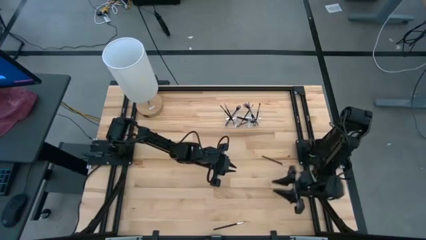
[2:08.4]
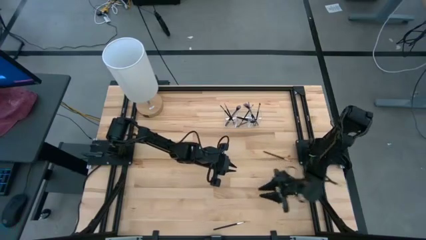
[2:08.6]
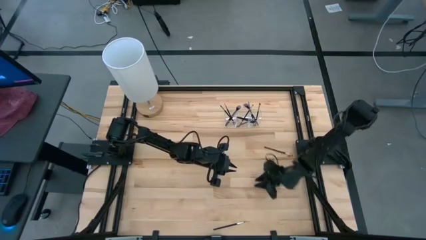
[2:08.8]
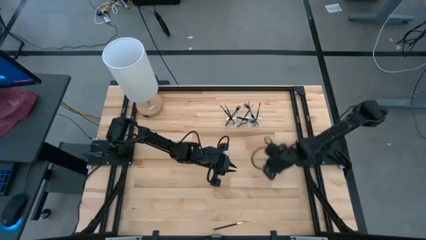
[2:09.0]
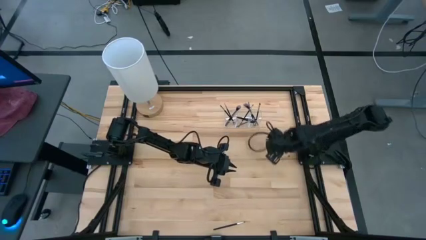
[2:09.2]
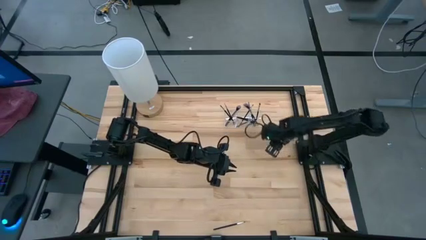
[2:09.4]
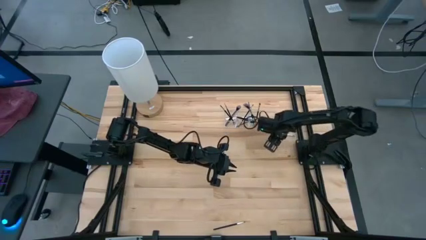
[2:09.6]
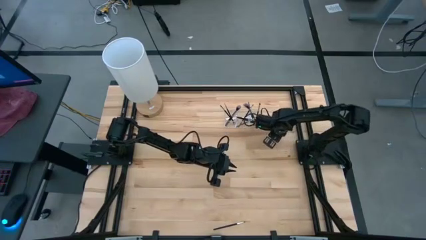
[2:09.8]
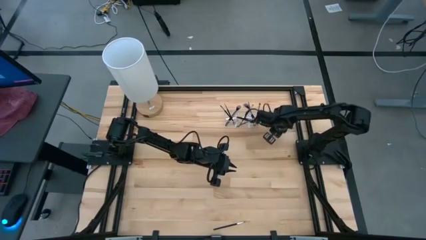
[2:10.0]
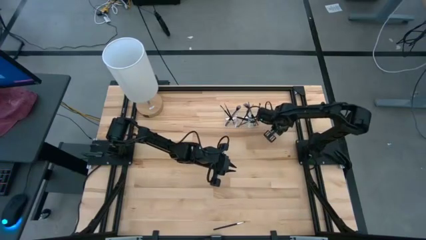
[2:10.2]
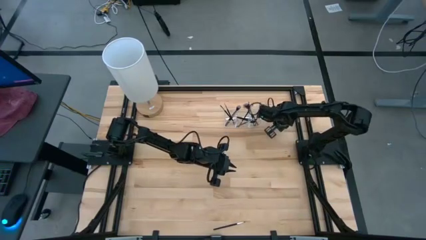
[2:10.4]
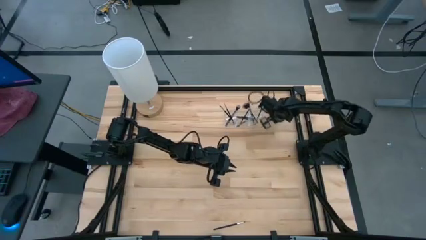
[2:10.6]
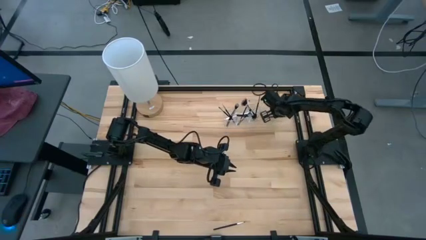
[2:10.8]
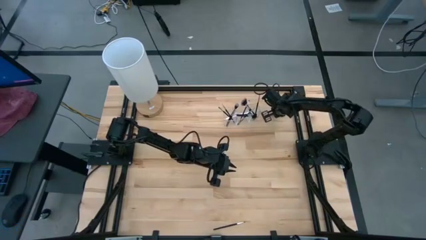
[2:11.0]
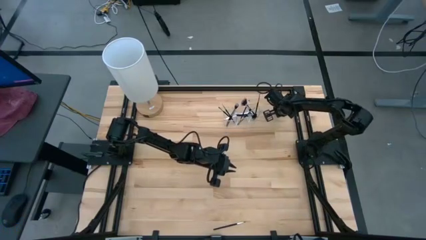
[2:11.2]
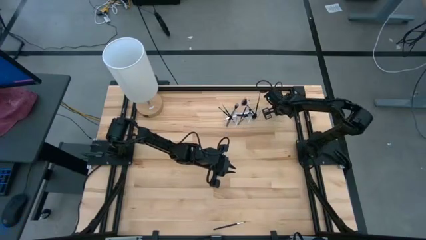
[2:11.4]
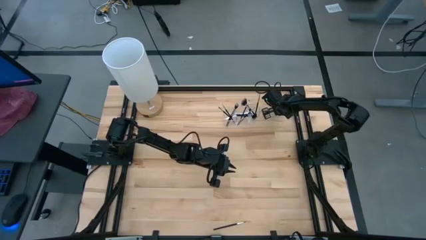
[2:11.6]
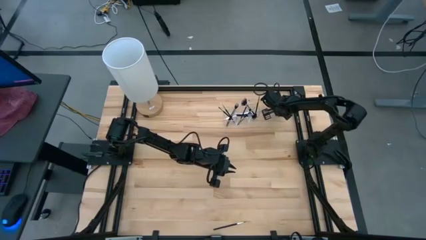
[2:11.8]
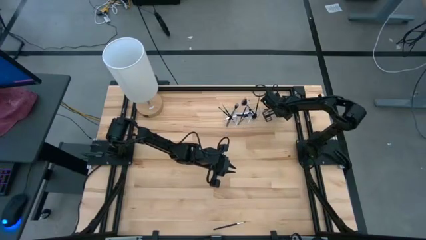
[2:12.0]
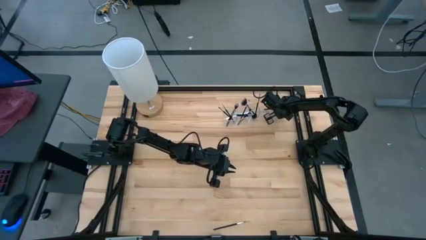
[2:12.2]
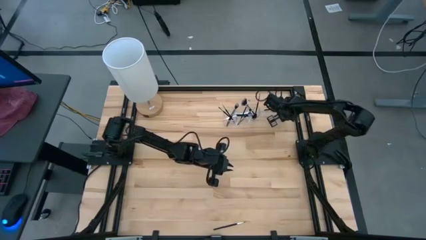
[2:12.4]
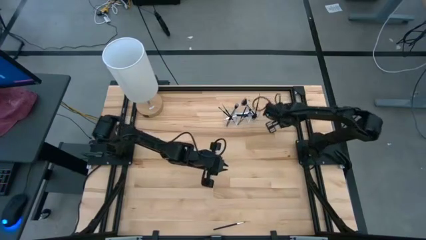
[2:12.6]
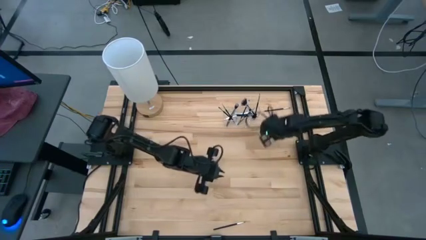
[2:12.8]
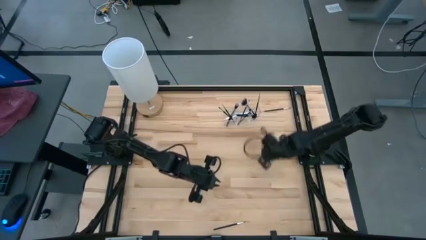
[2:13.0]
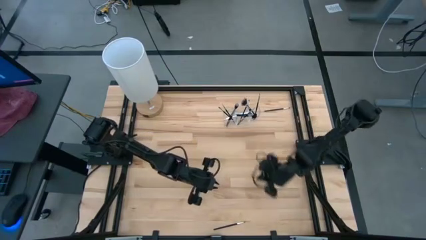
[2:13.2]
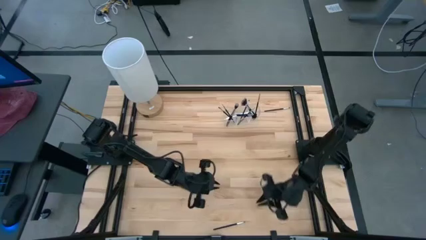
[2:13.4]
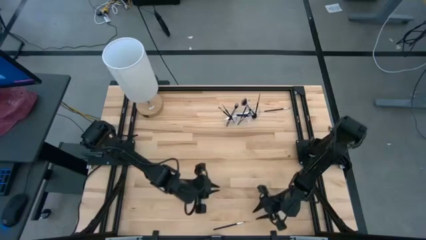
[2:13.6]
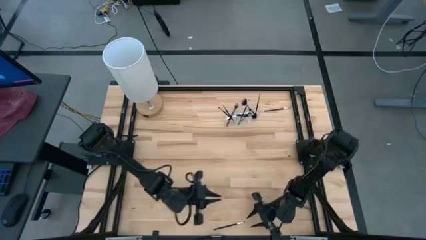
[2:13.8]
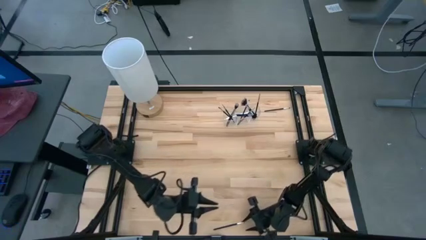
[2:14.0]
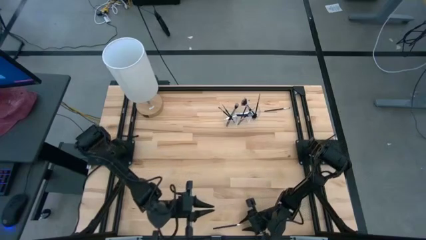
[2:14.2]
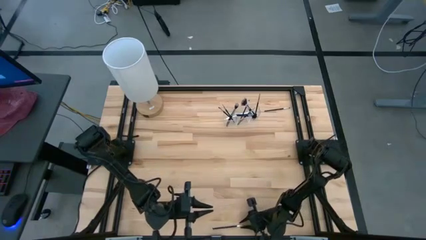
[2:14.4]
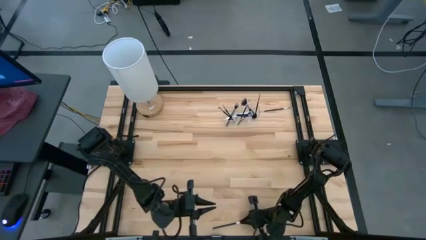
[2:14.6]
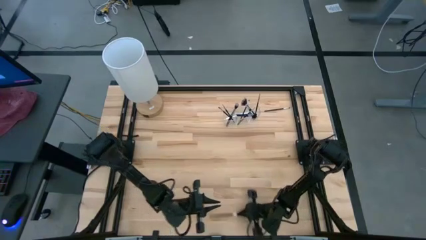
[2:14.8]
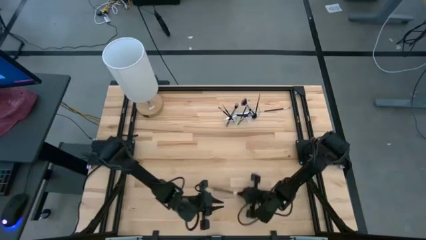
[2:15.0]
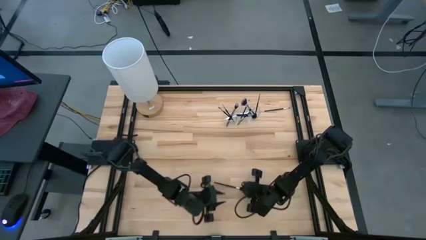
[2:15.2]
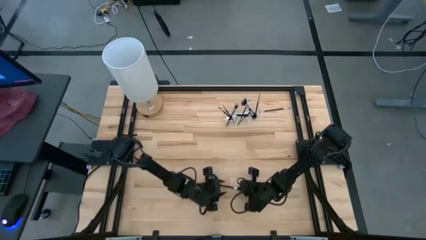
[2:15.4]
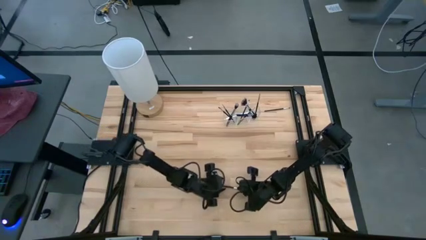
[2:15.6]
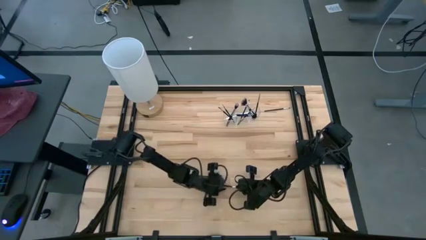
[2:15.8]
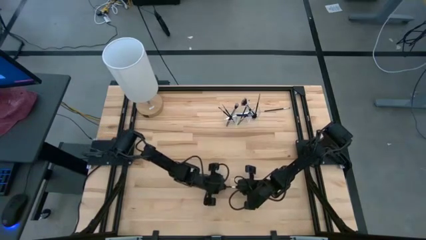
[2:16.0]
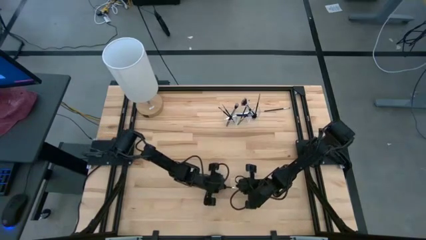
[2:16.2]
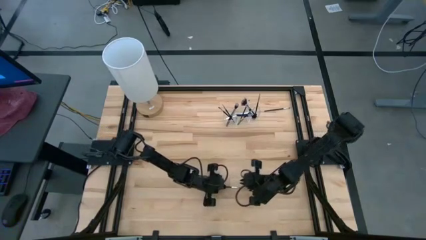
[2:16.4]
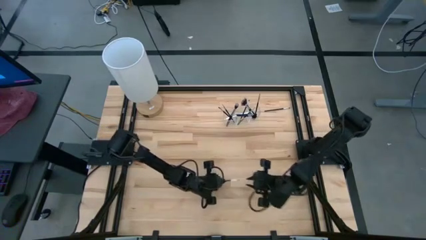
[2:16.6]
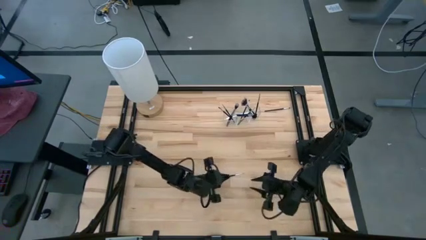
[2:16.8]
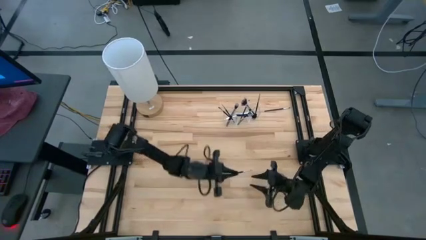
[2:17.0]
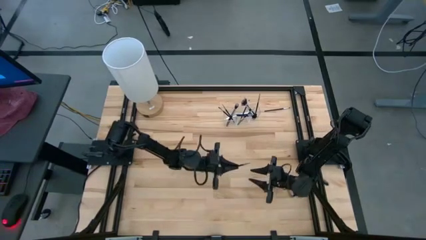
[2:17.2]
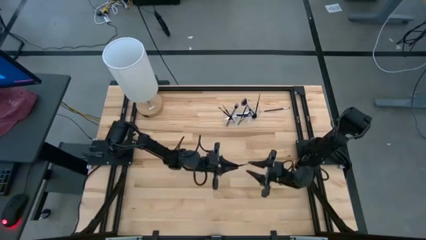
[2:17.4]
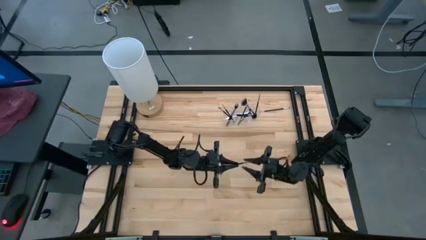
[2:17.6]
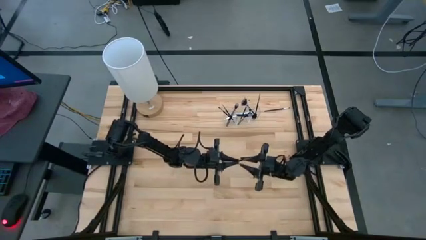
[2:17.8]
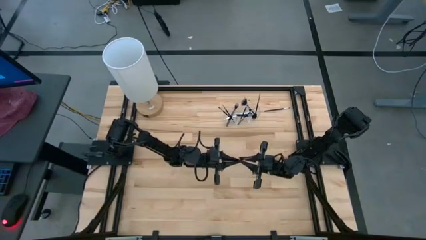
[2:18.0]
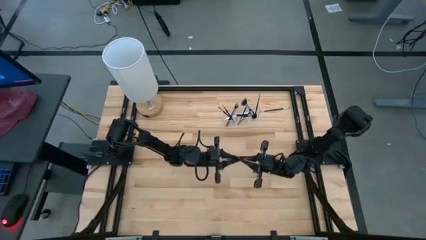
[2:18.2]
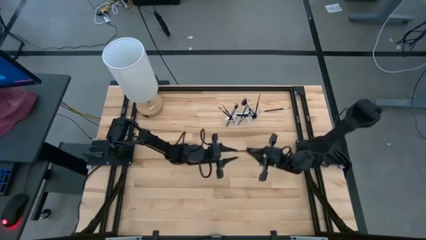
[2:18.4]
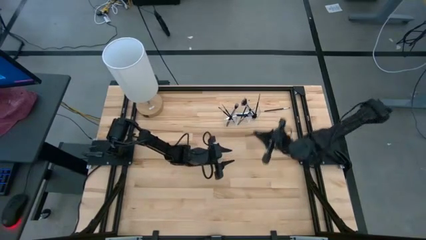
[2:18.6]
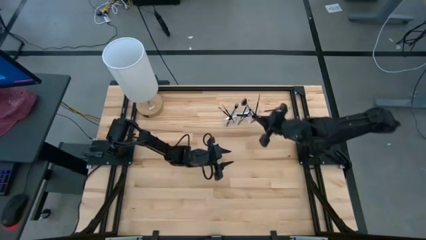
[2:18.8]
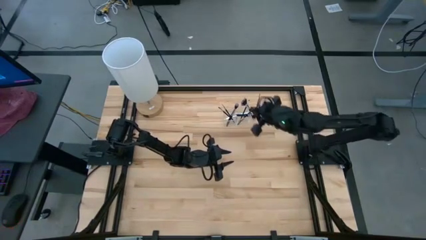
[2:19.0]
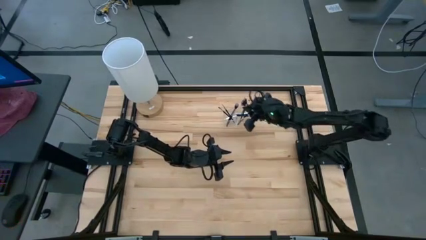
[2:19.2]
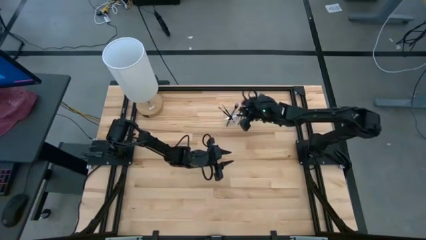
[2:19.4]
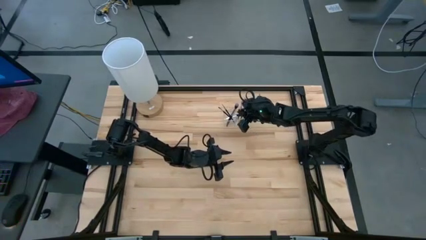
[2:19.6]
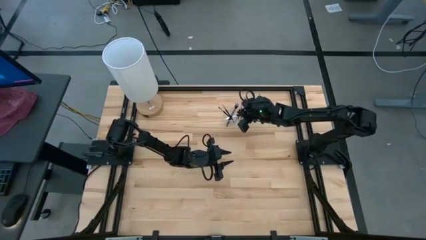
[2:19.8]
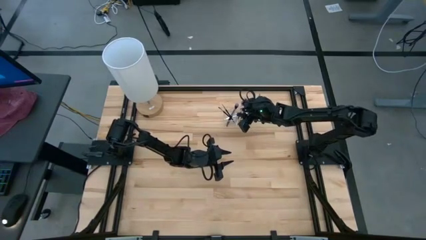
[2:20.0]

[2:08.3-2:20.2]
Task: Put items in baskets/containers
Put the black eyeshadow brush into the transparent organizer
